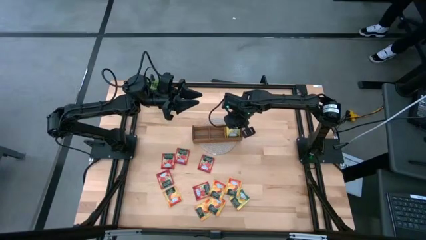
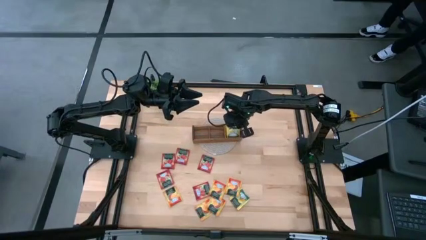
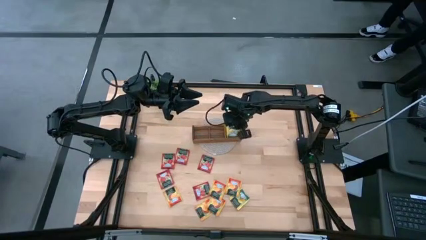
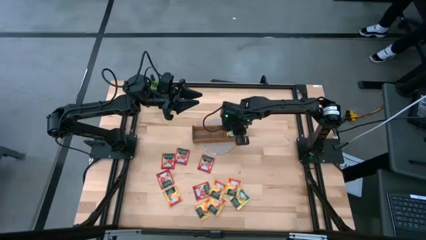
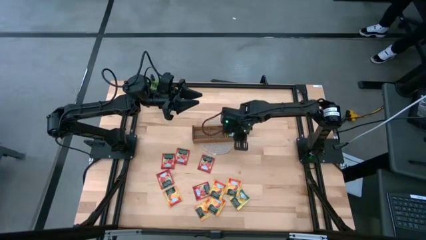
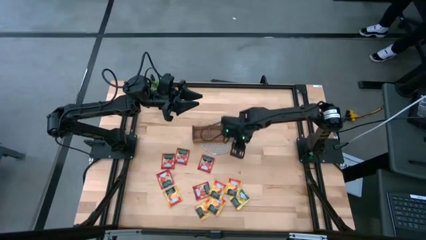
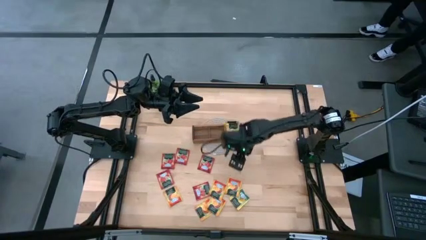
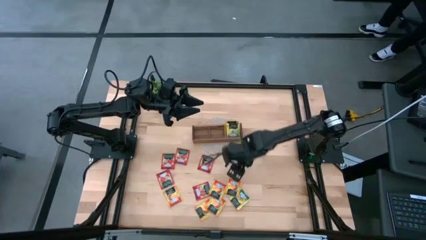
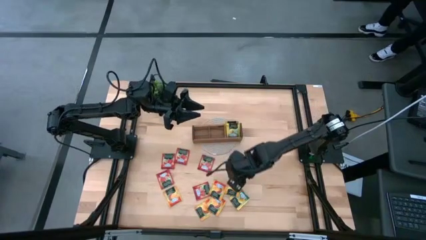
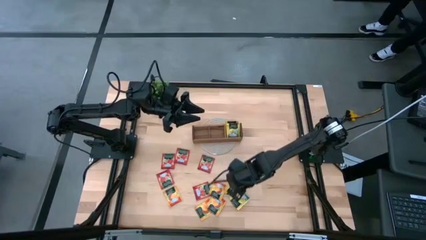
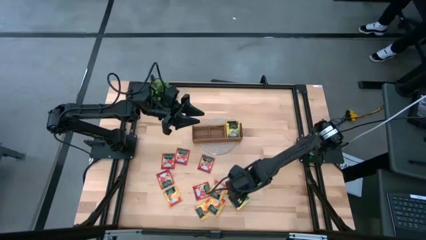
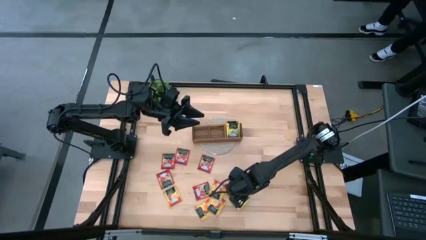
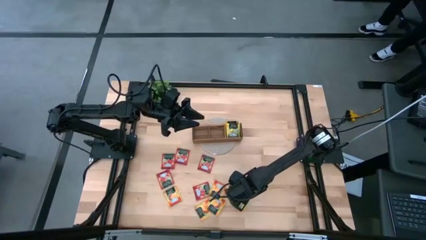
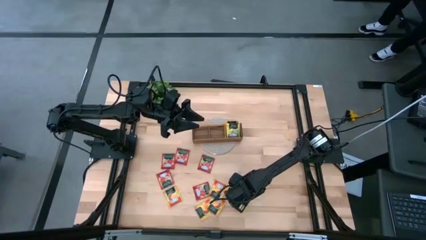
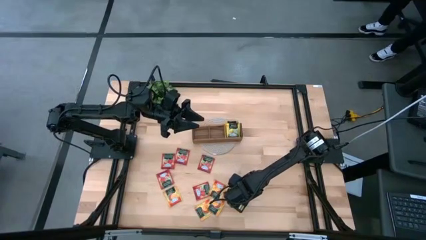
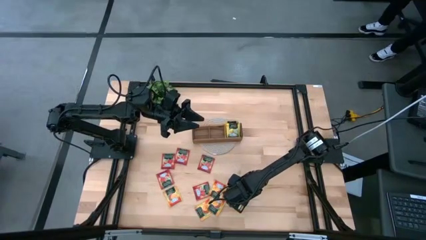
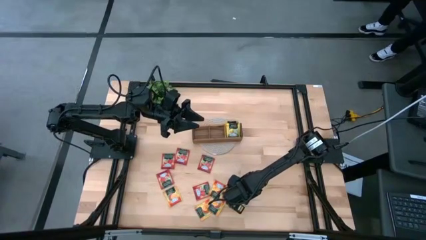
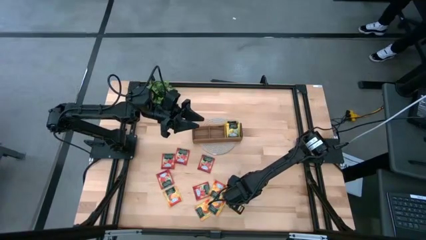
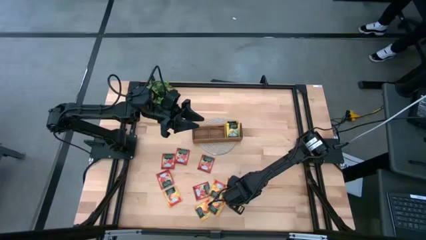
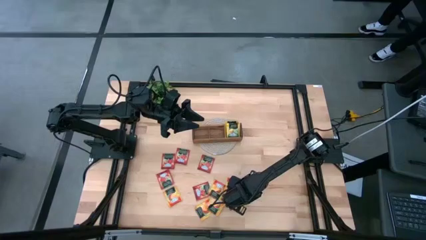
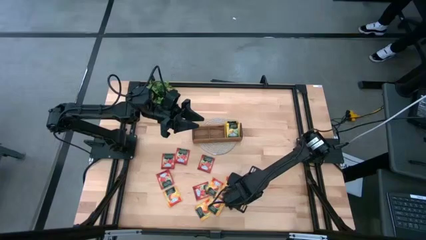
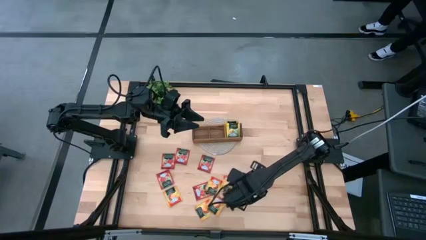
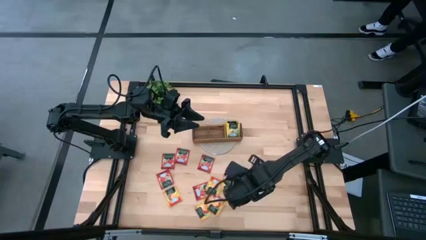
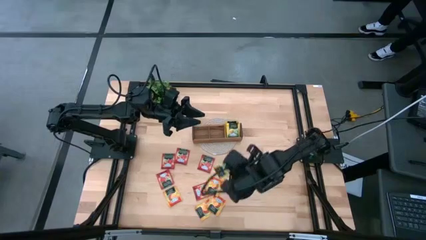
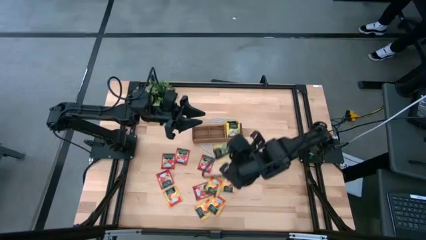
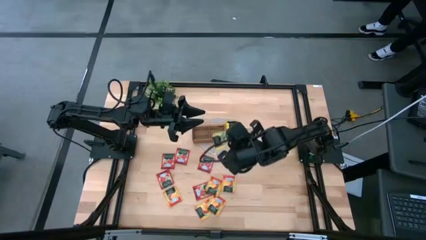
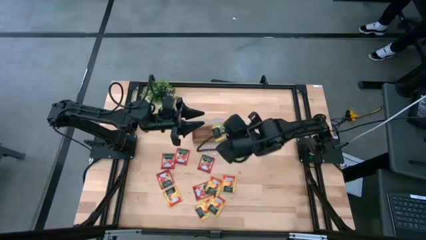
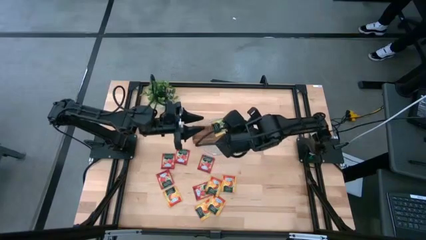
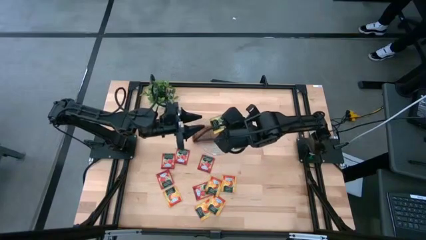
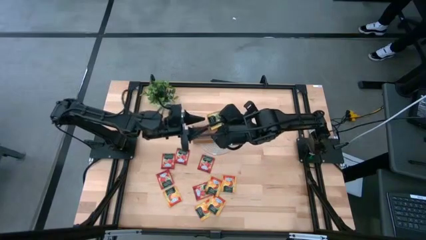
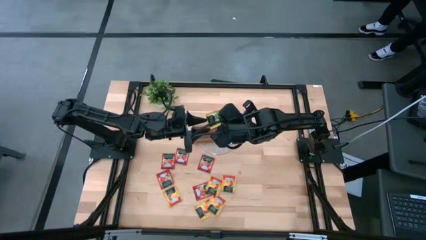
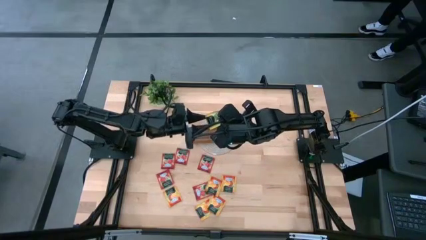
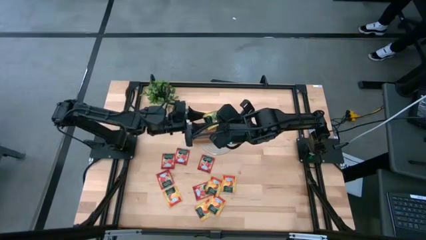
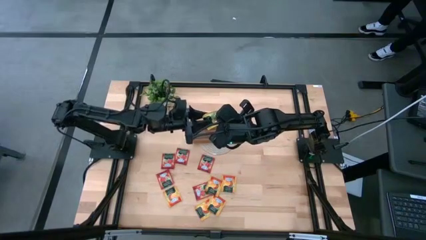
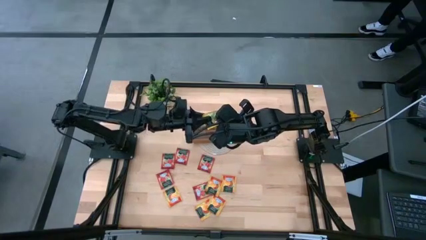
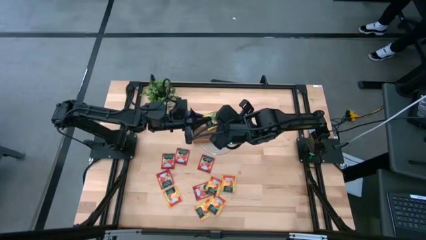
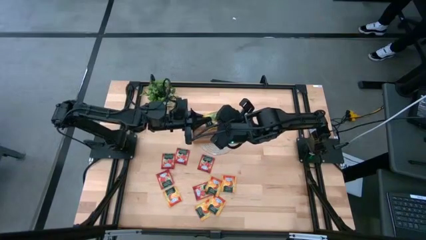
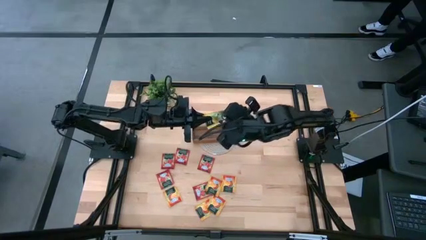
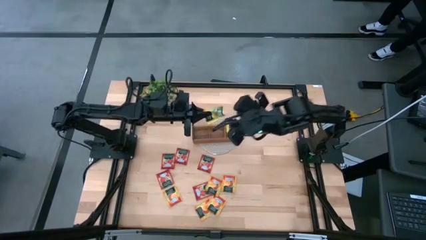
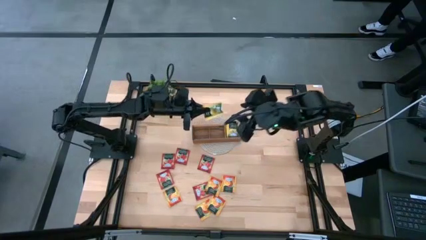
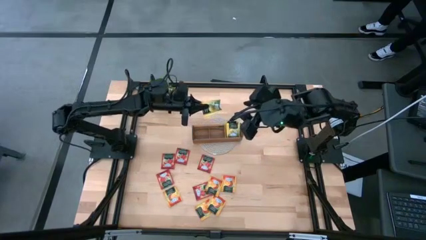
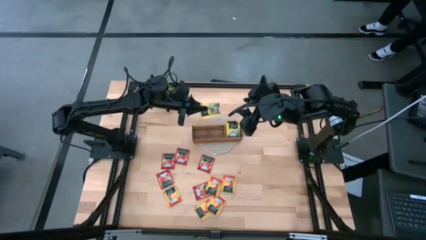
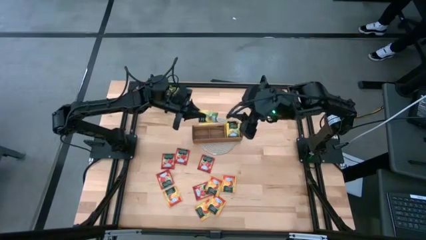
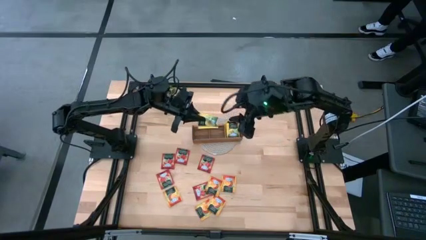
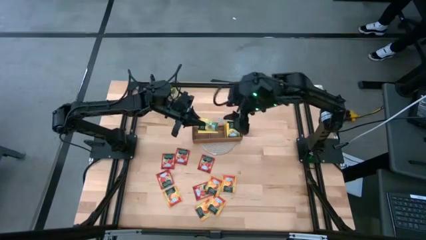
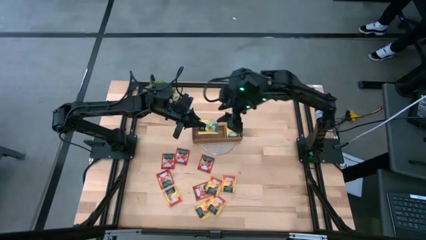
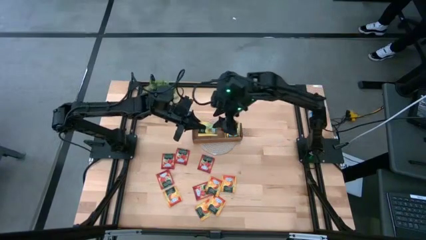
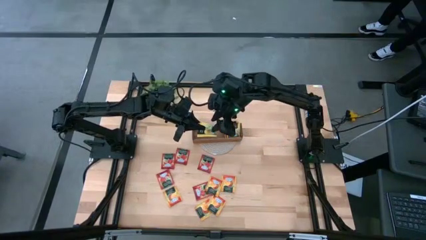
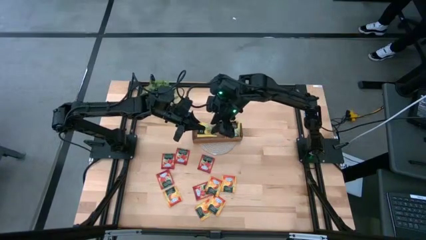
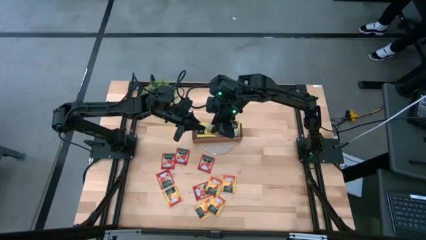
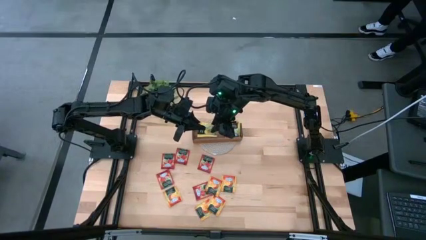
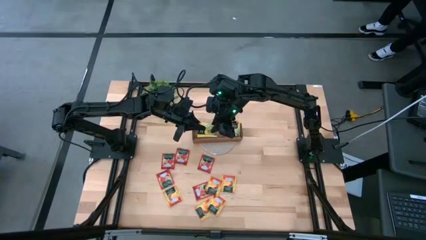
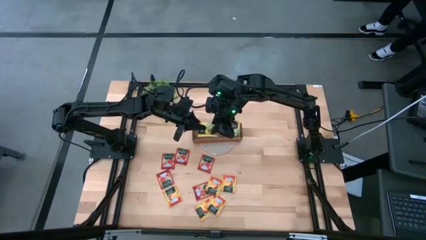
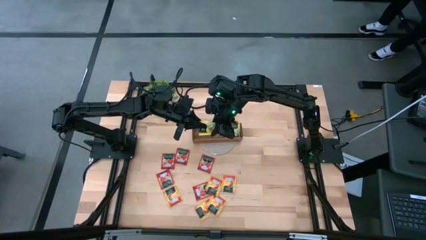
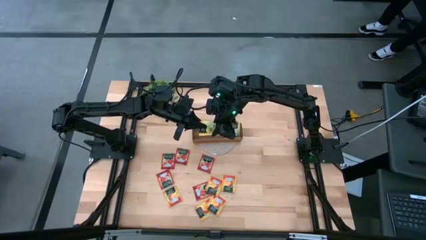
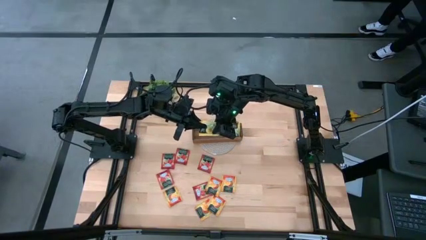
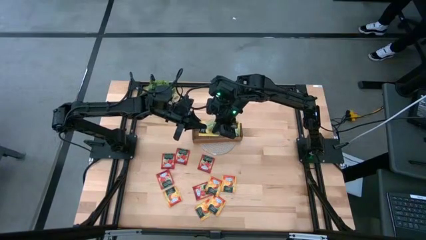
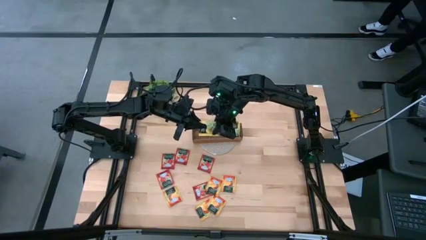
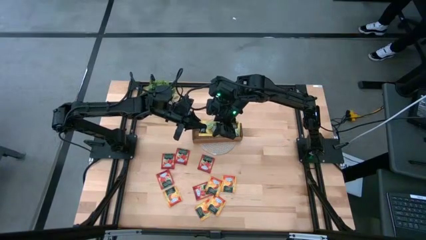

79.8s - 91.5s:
Task: Pick & Place Tea
Put the yellow tea bag into the right section of the wooden organizer

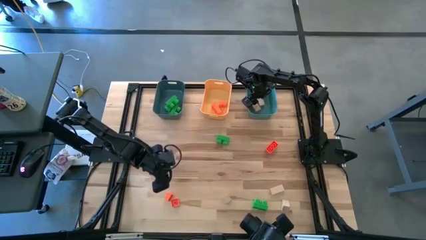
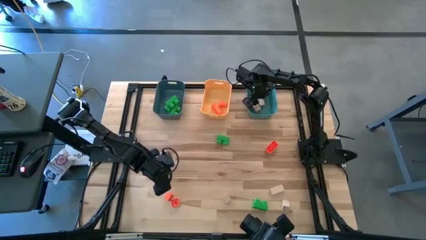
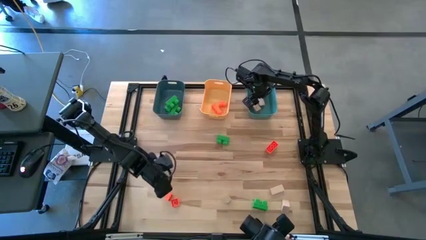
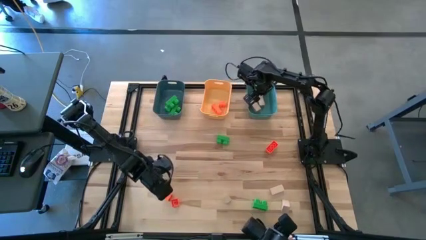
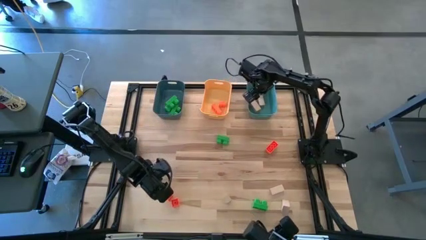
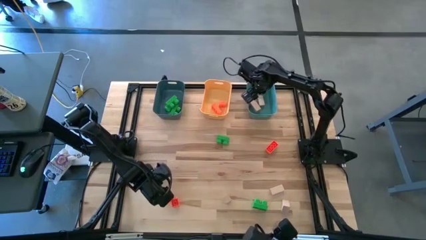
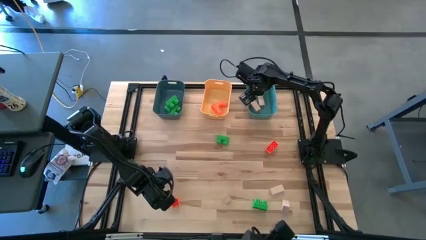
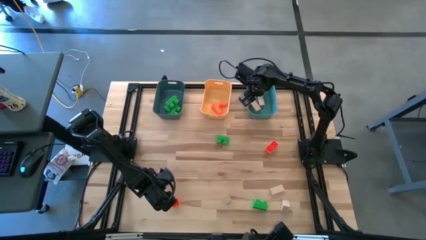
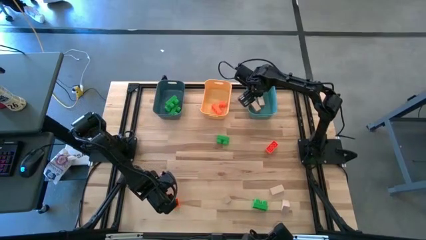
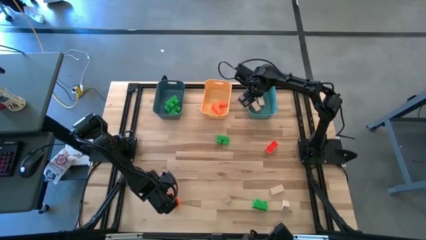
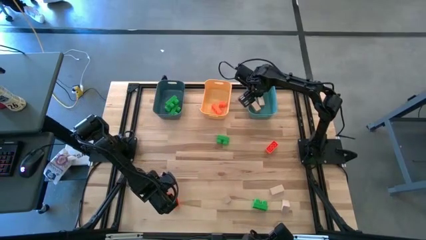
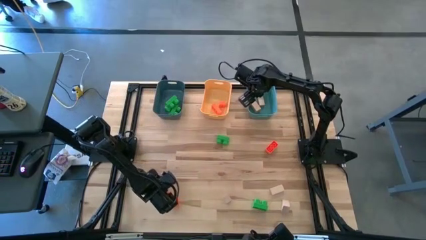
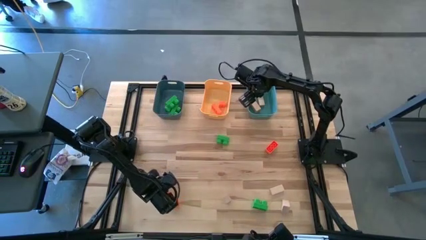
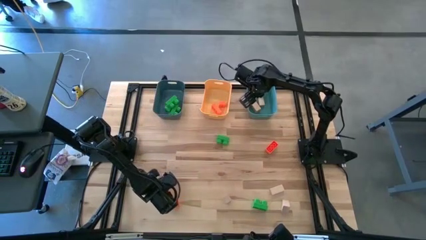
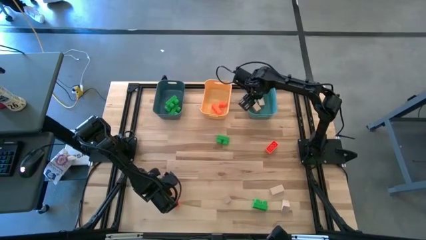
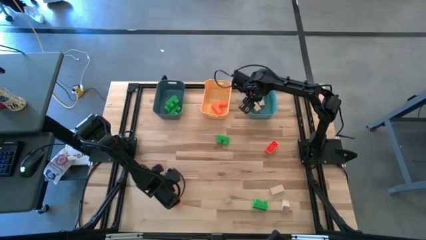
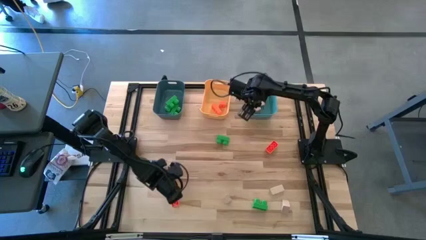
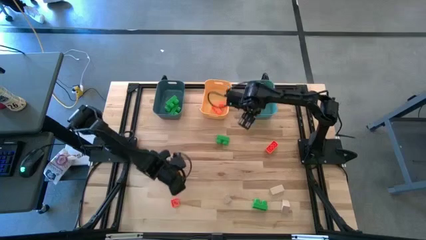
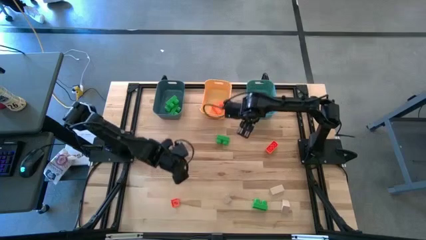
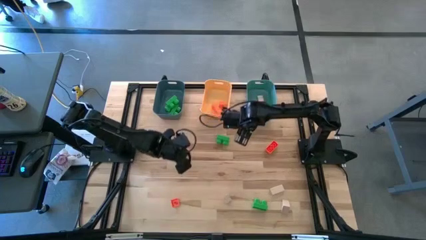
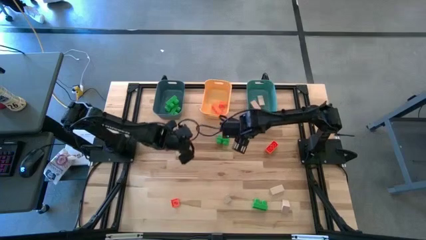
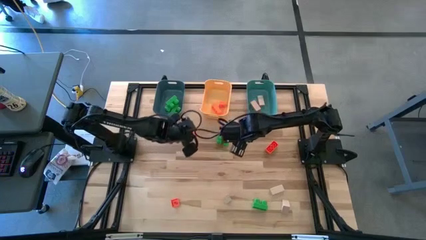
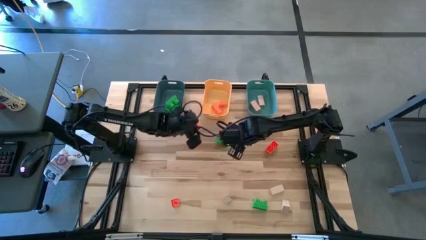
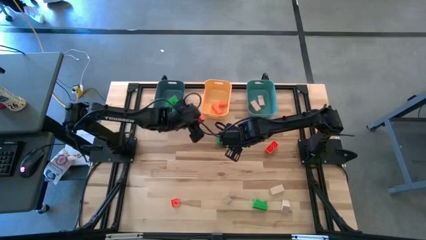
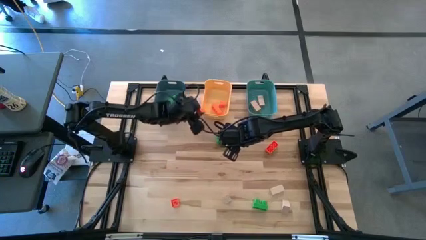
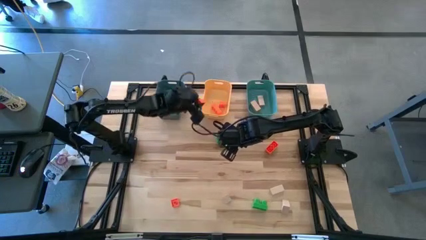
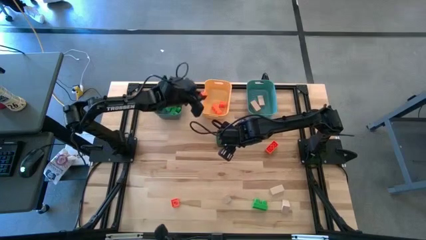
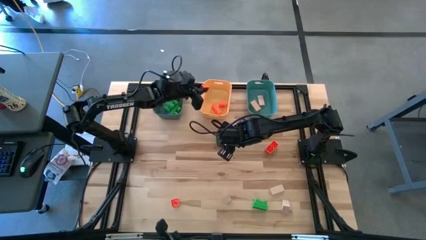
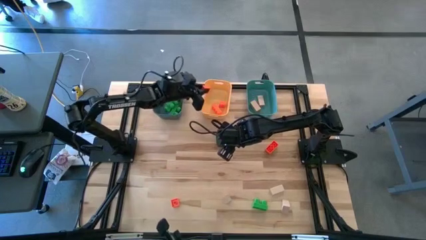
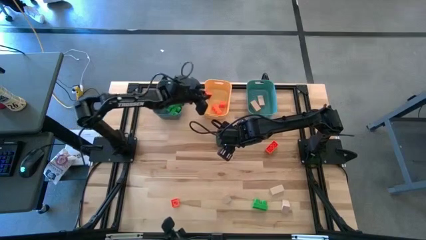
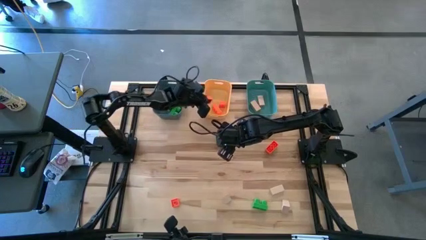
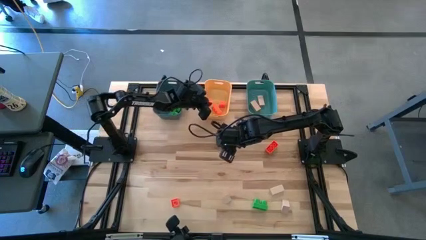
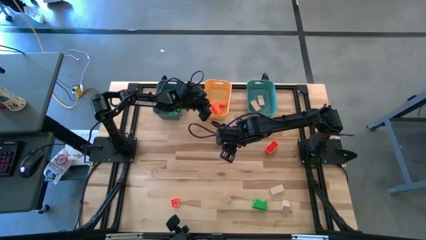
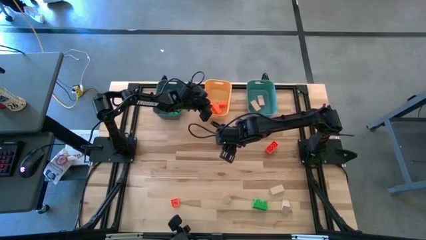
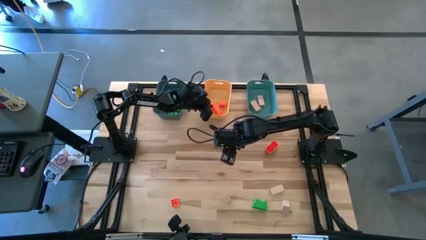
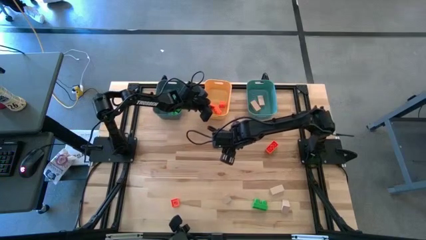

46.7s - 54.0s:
Task: Sort & place blocks by color
Put the orange game piece into the yellow bin
